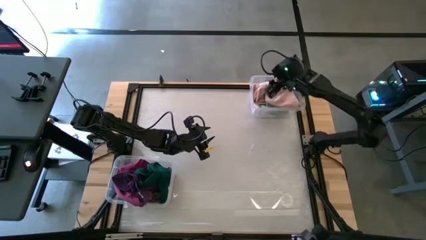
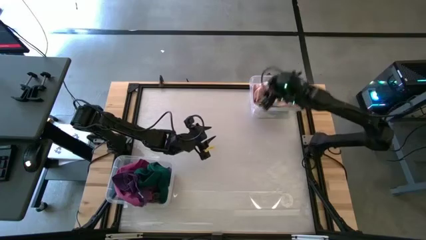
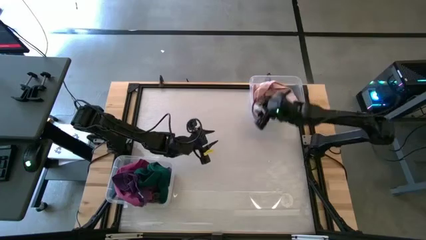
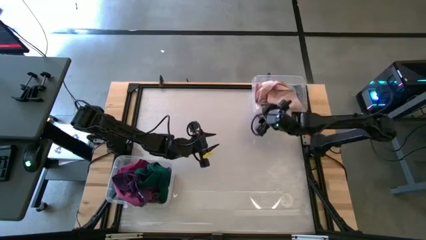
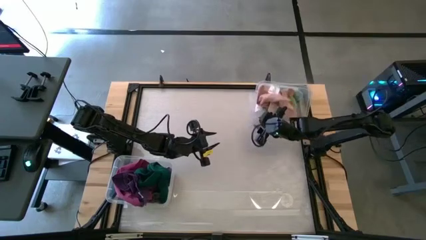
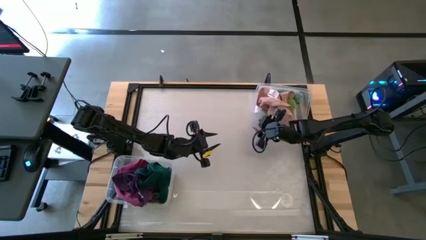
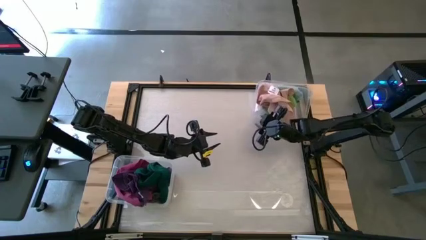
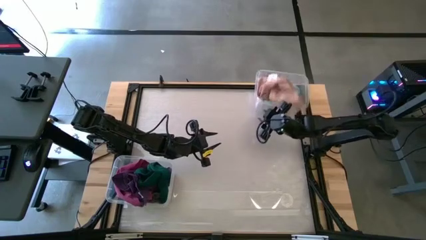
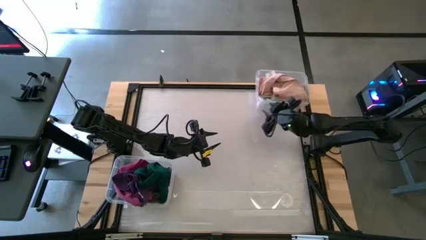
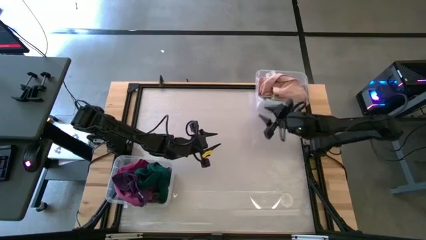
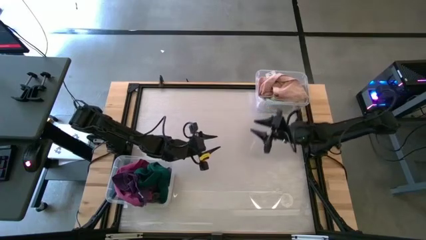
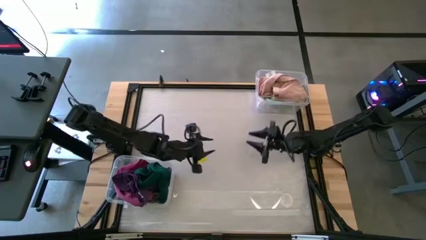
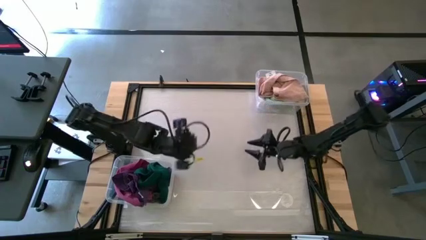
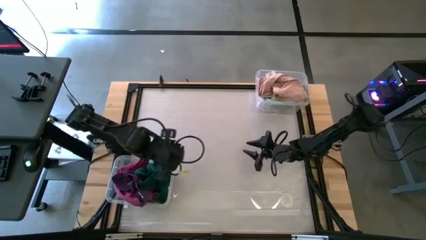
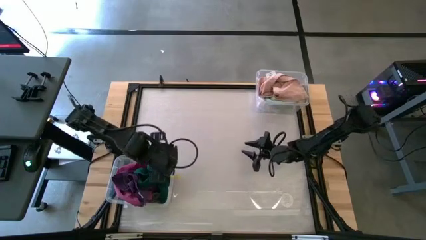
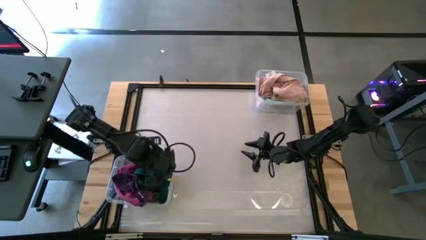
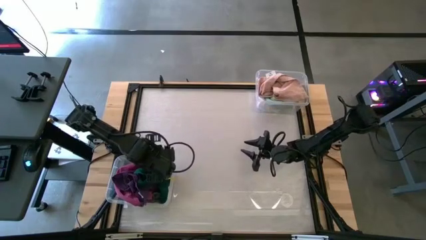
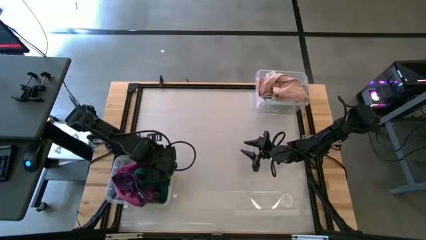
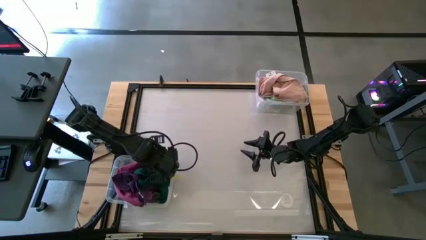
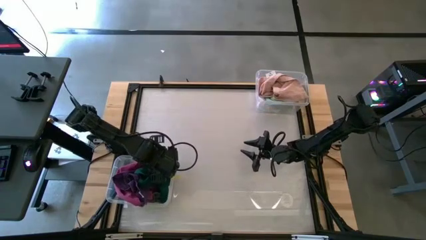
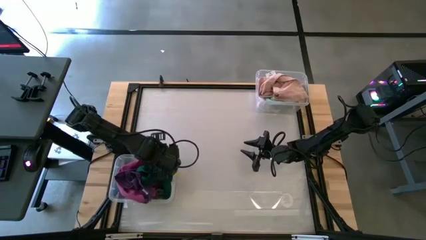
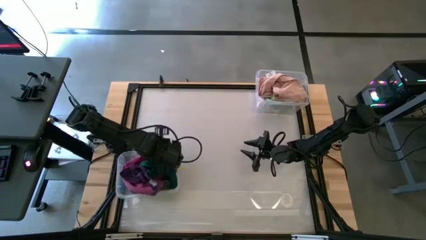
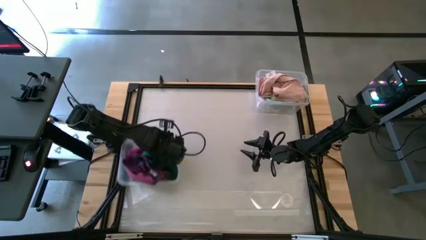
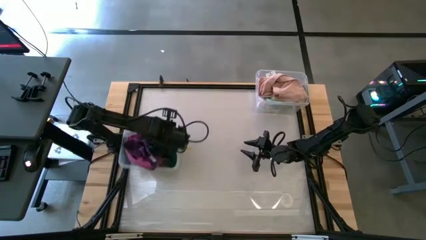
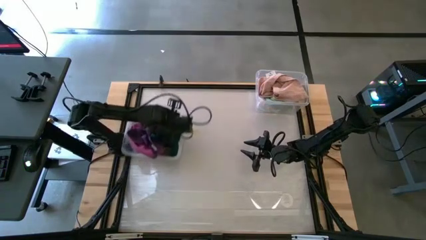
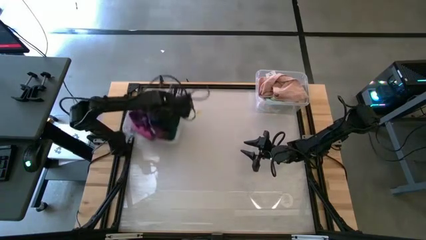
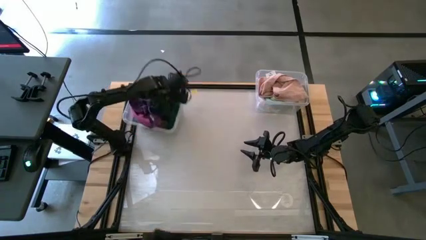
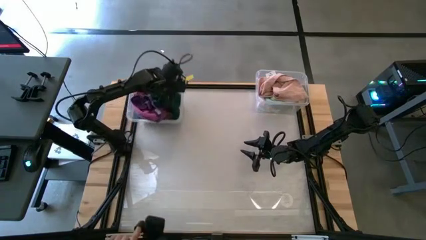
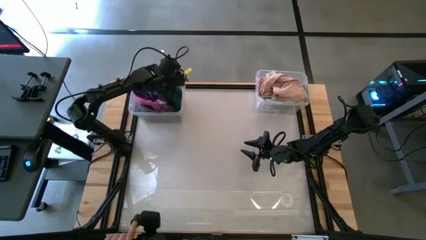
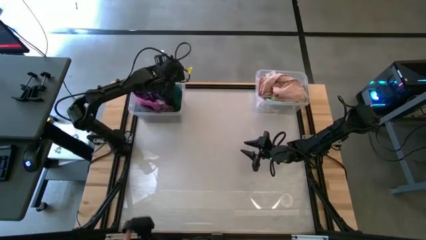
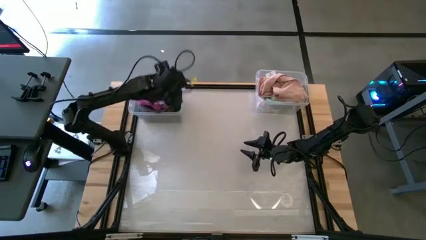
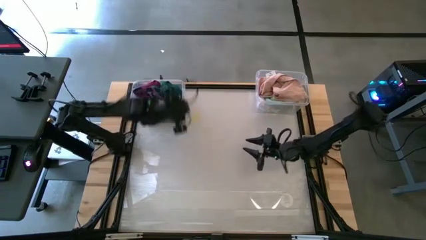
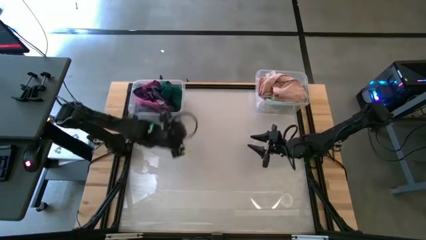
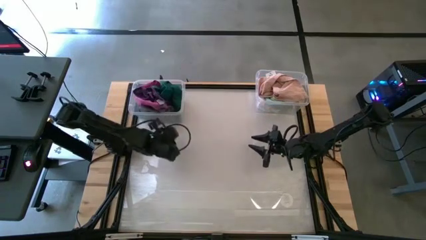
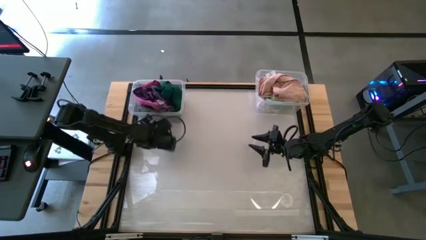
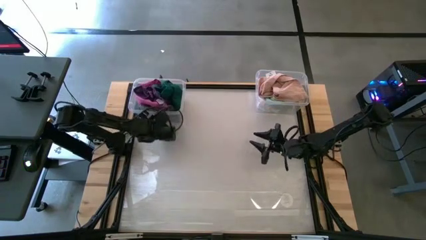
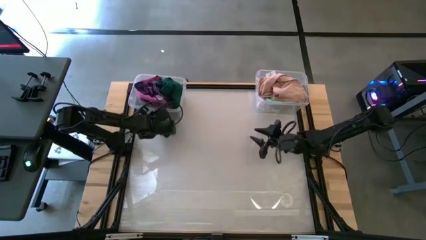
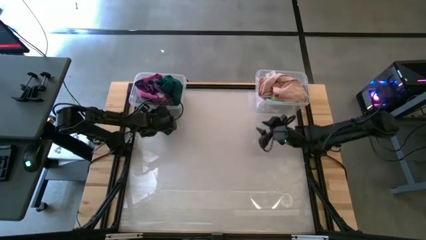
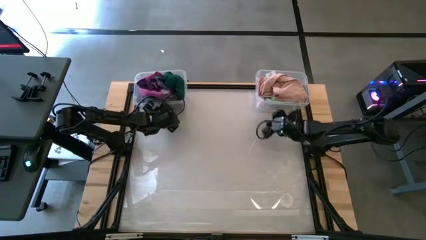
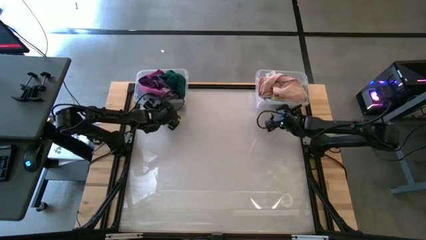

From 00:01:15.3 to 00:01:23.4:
Task: Sort towels by color in basket
Move the bottom transparent bin to the top left of the table

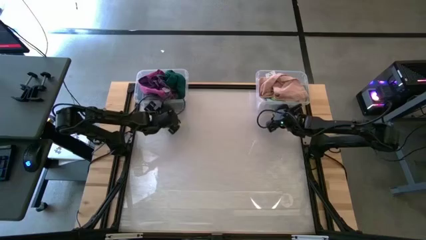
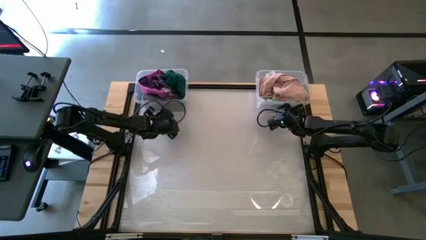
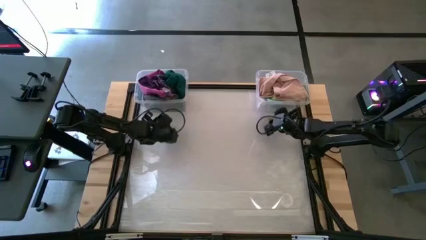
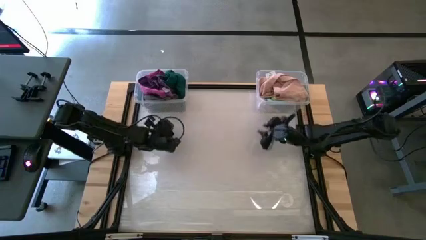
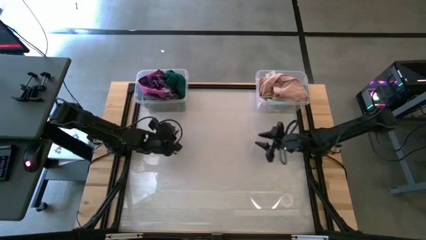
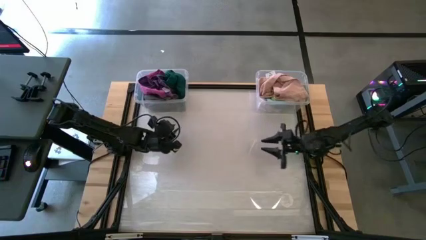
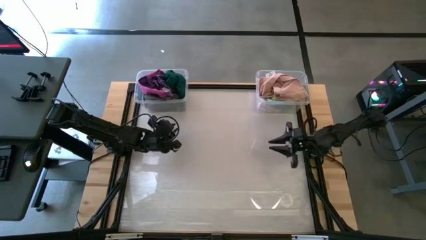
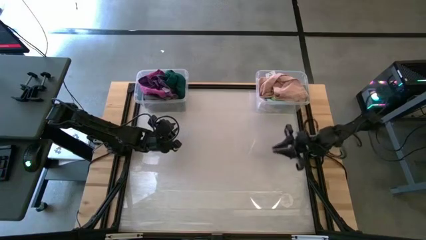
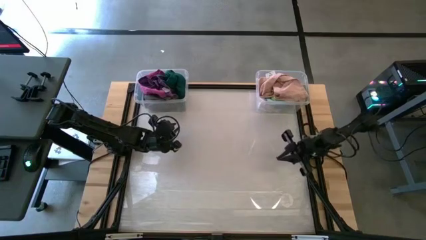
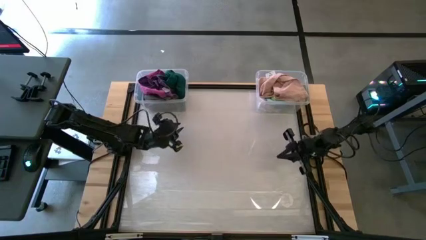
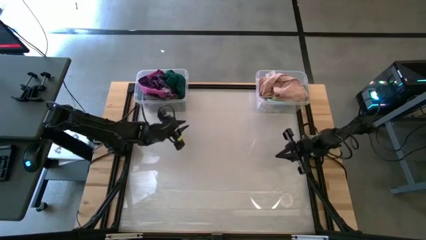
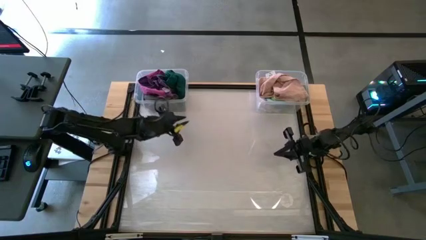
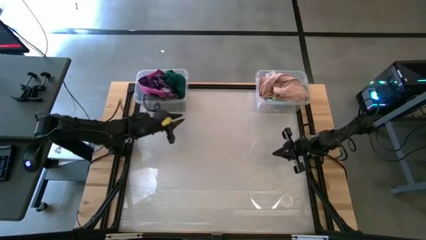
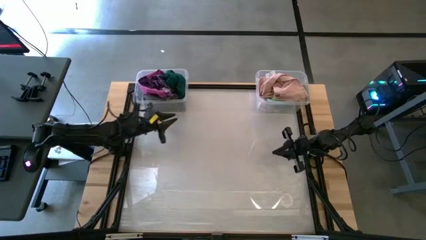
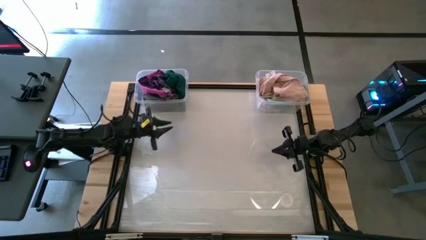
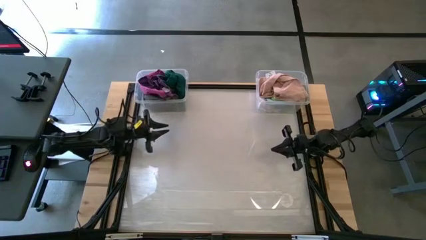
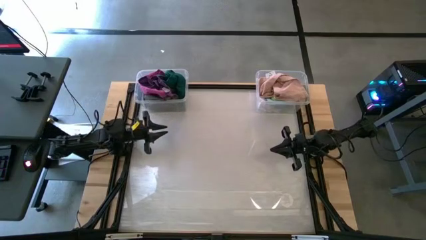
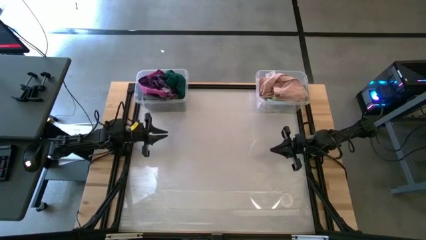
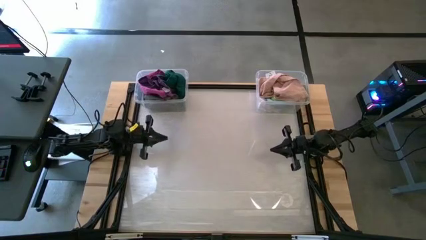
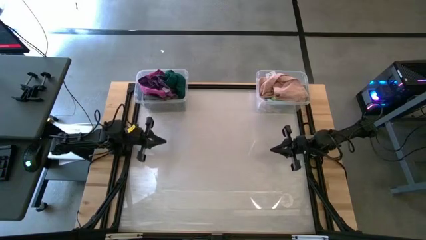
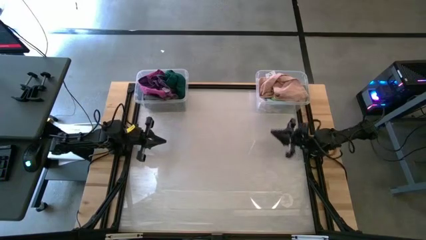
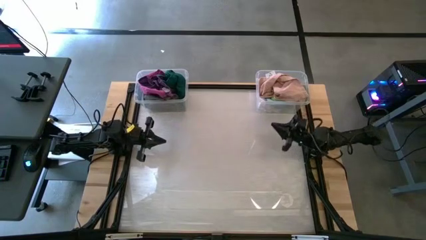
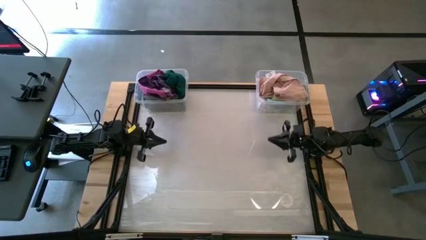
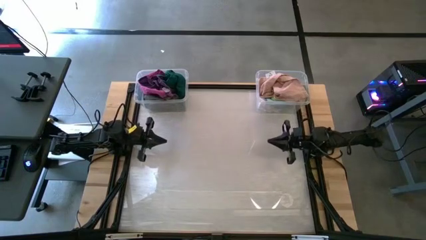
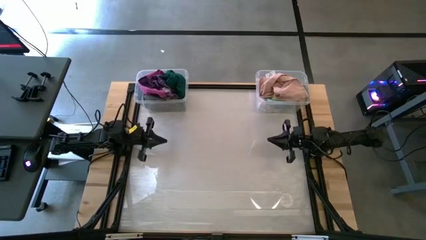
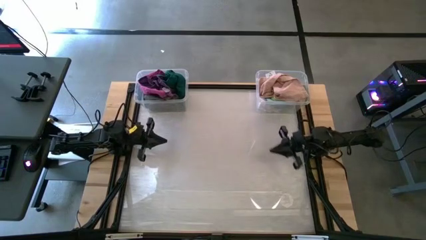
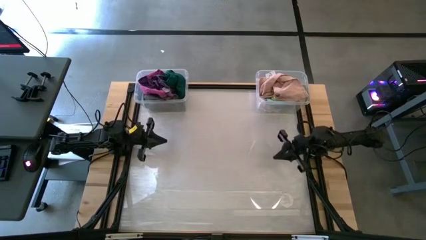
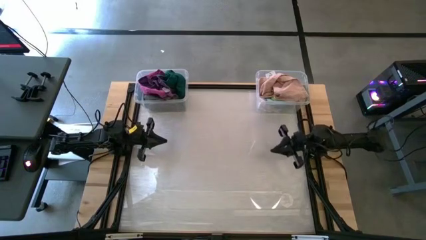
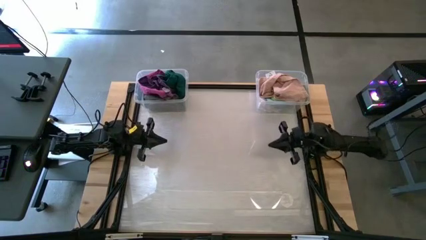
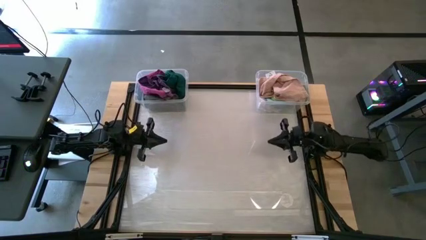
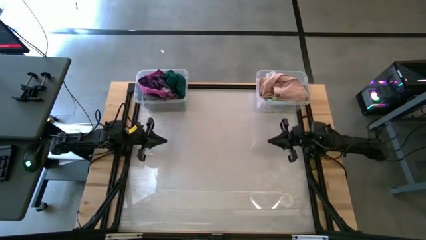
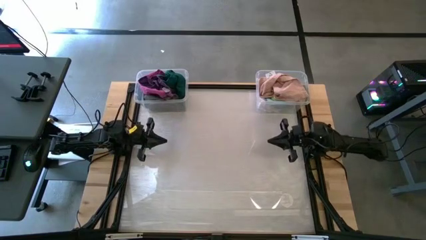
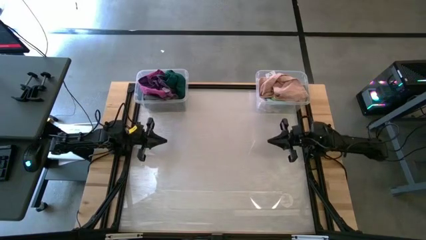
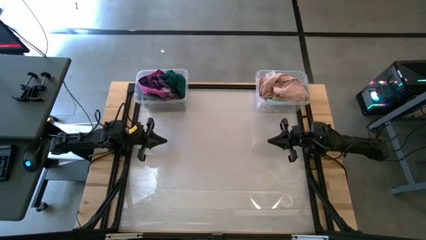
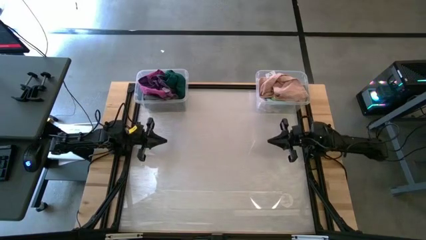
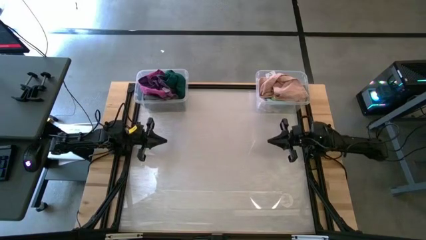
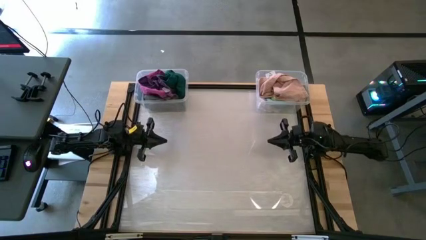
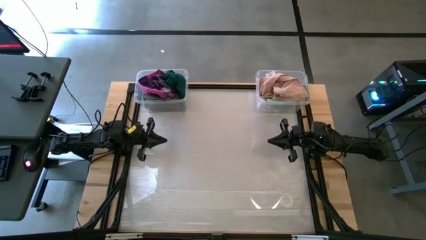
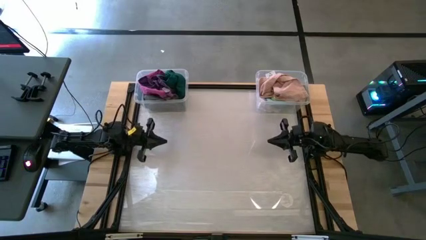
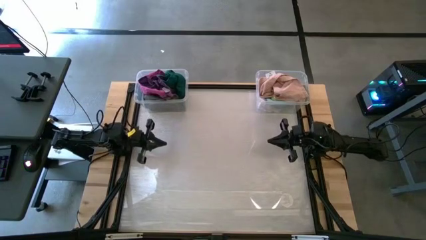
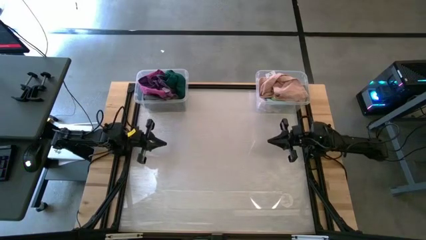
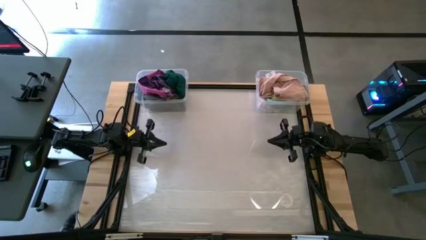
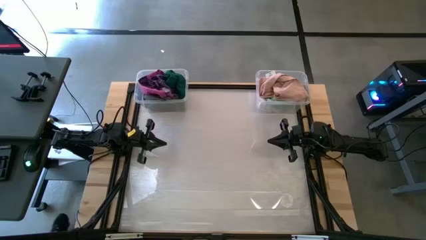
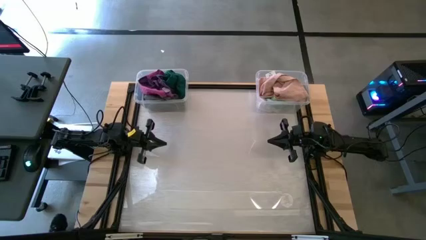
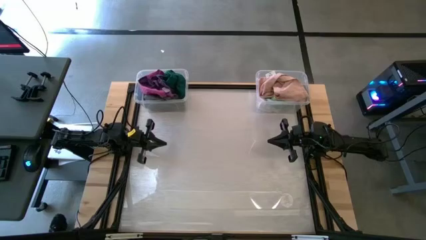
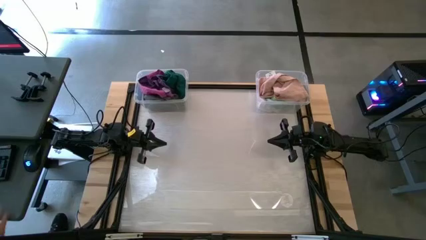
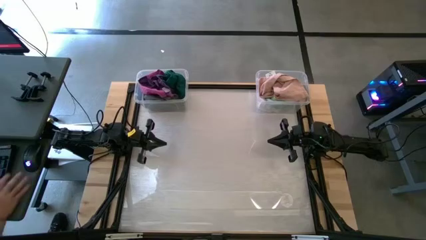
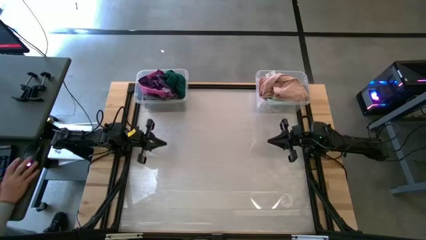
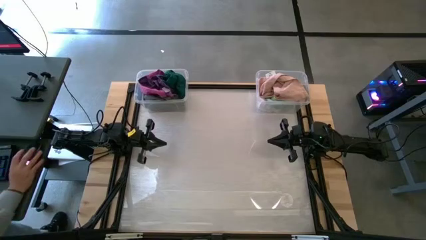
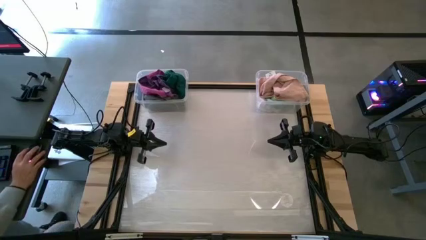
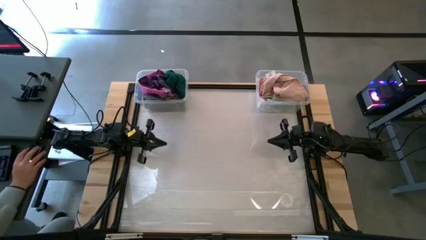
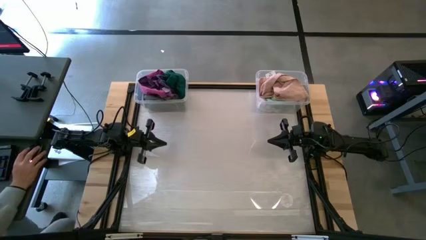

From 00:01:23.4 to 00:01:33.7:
Return to Home Position
